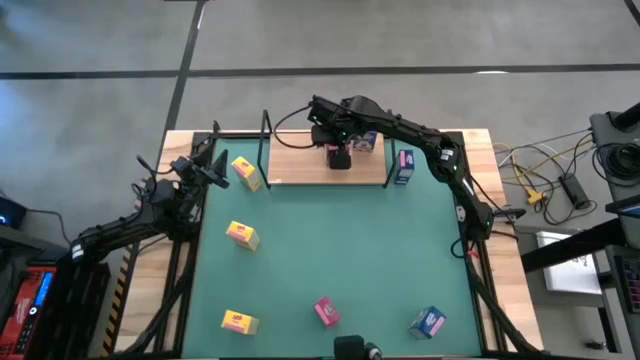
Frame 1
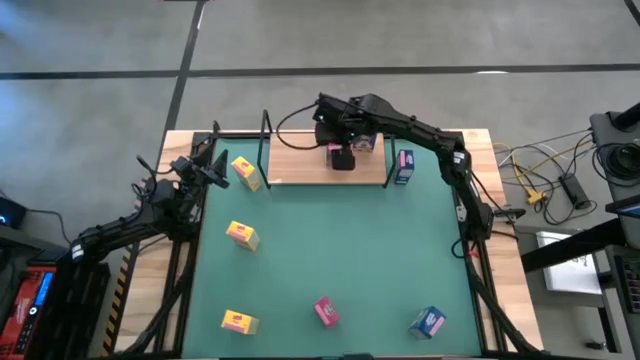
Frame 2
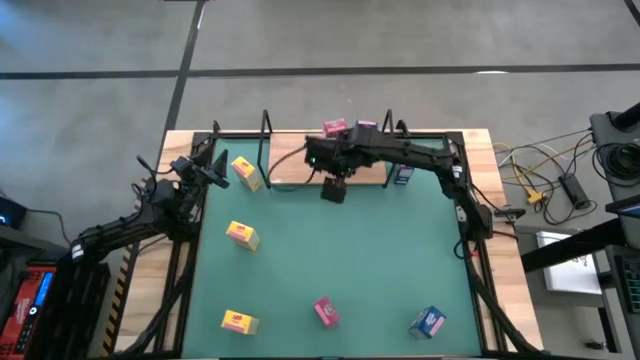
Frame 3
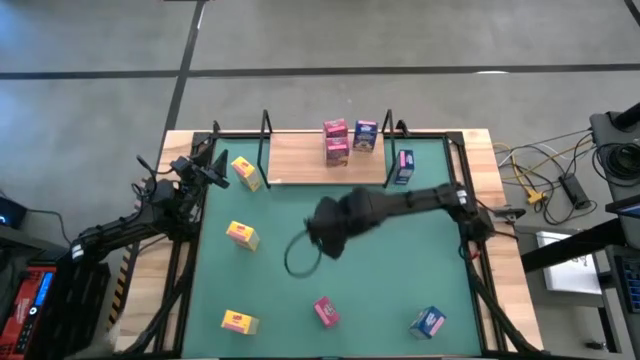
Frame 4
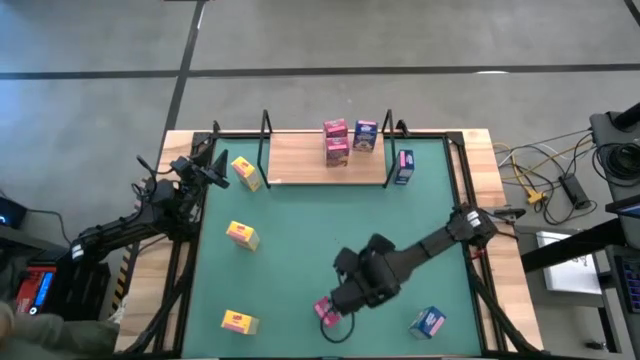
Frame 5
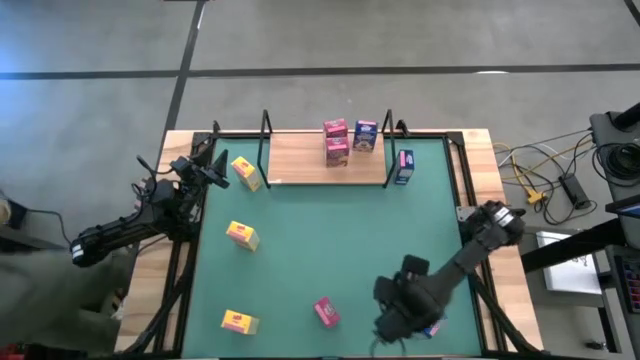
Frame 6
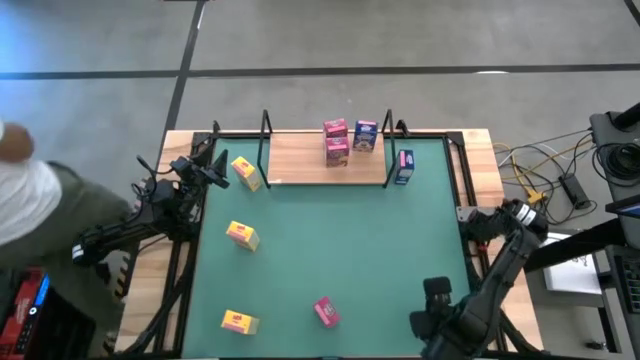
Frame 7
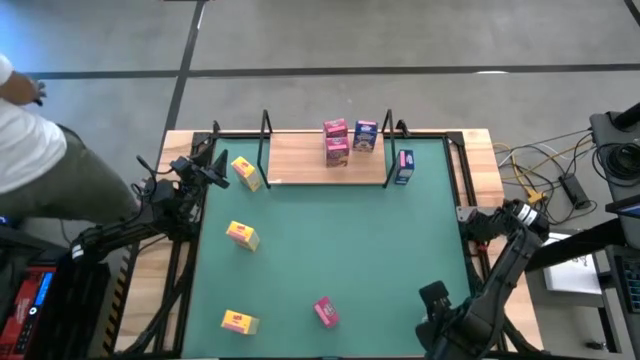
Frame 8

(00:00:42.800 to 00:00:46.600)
Task: Stack cereal on shelf
Put the bottom blue cereal box on the shelf and align with the other blue cereal box

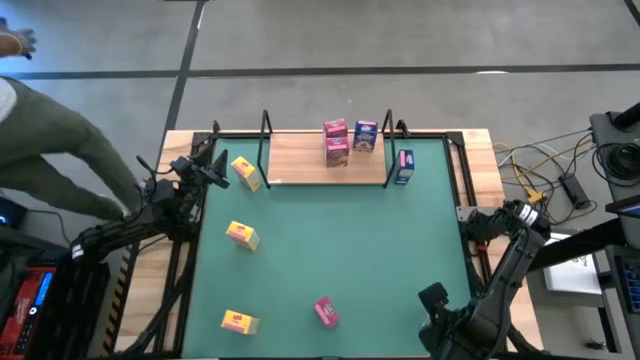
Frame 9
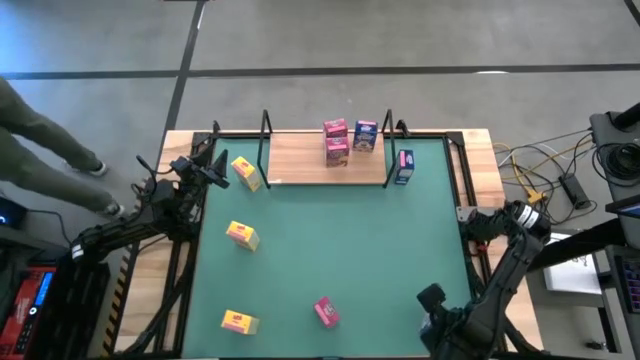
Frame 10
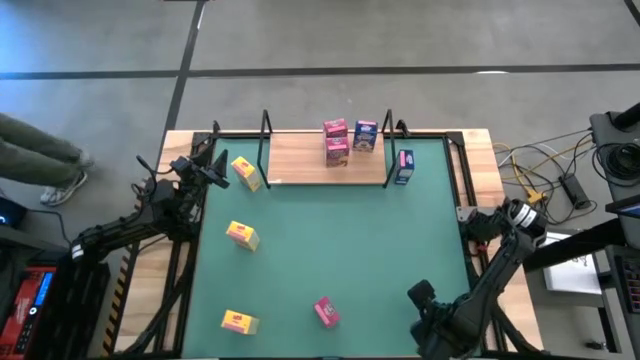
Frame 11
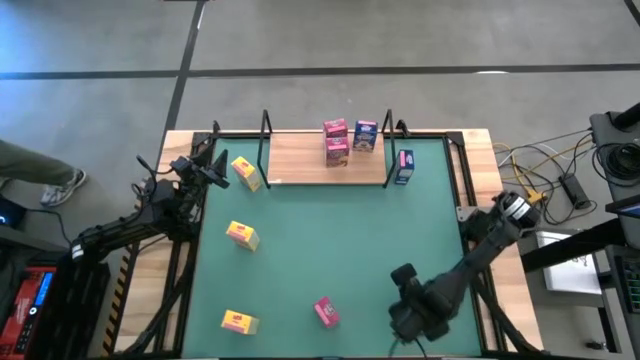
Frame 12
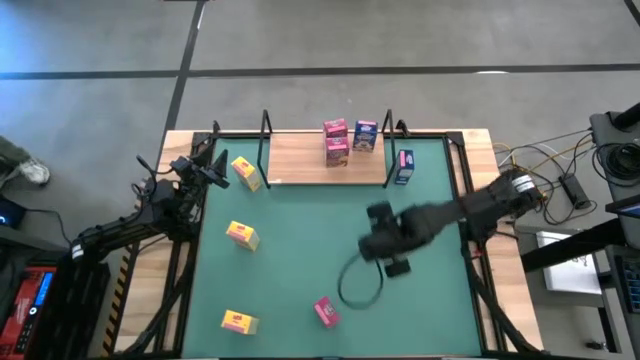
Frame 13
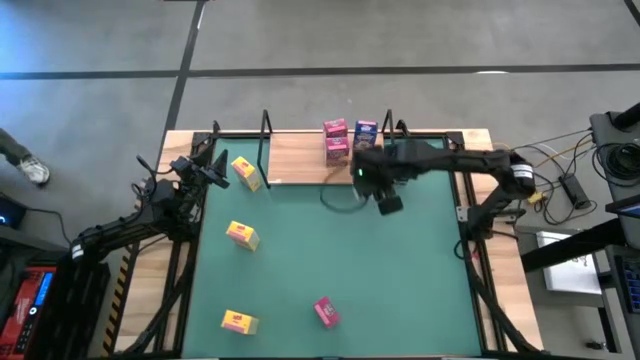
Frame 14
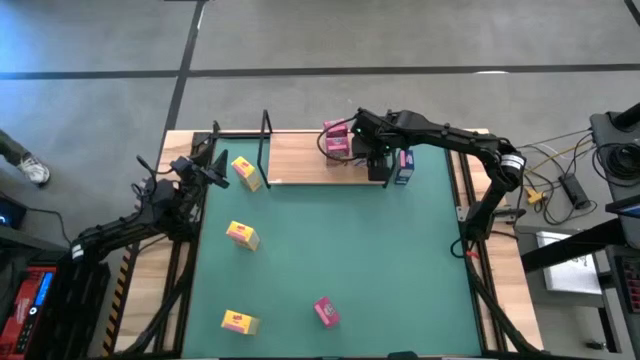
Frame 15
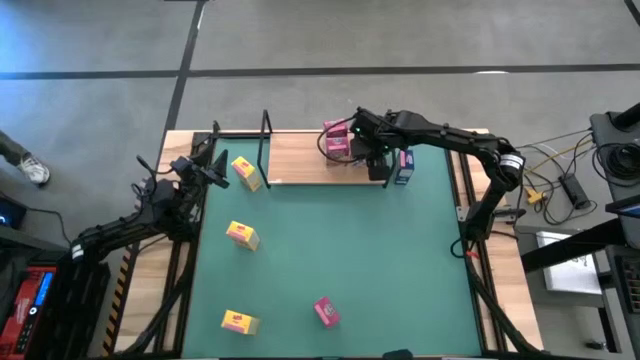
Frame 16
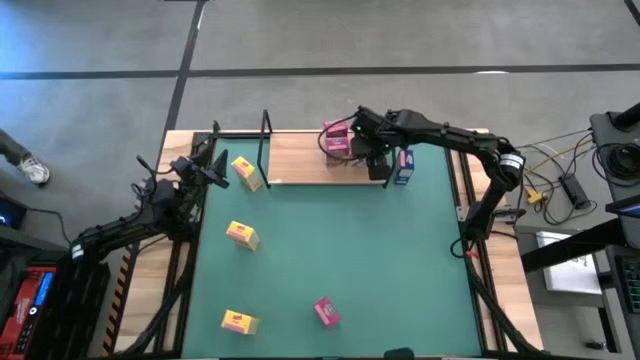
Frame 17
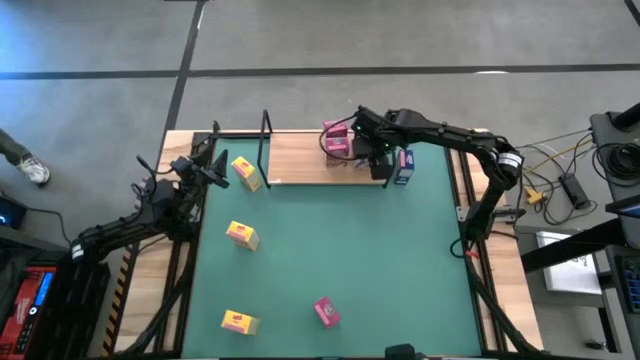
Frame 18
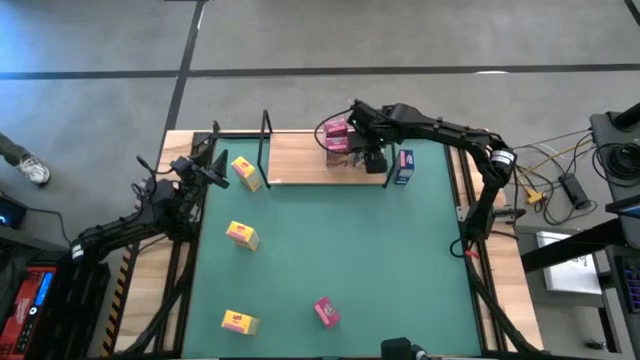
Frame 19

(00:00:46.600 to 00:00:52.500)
Put the bottom blue cereal box on the shelf and align with the other blue cereal box

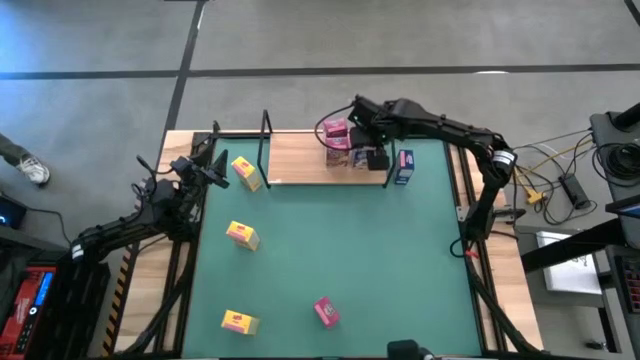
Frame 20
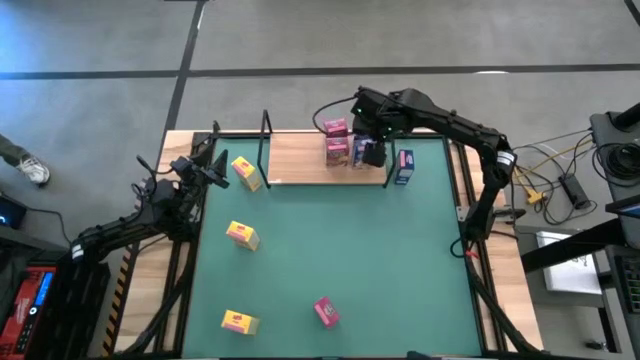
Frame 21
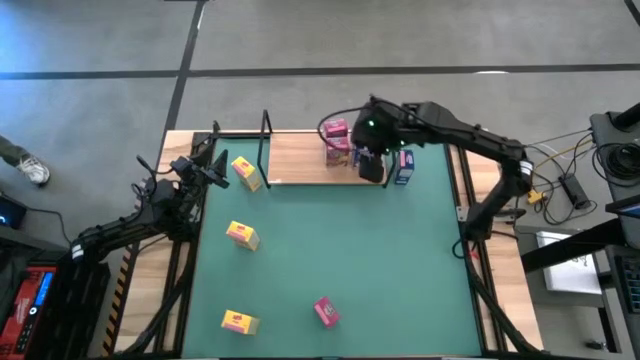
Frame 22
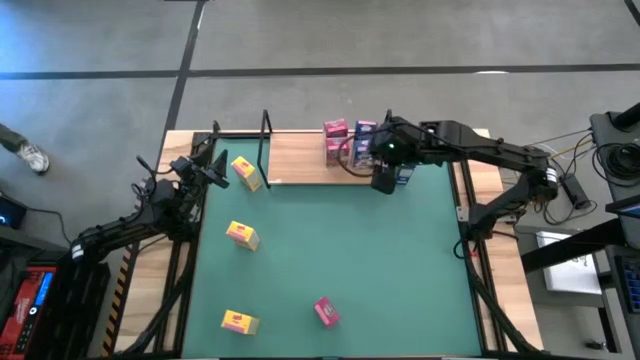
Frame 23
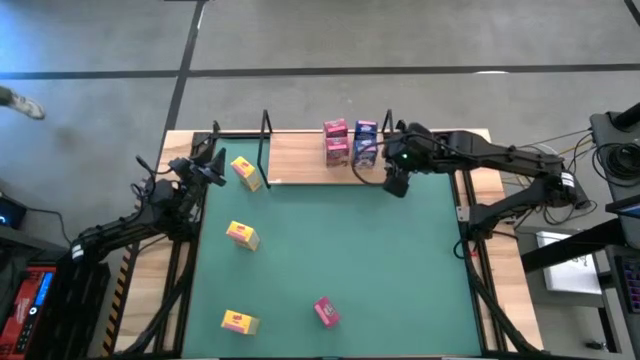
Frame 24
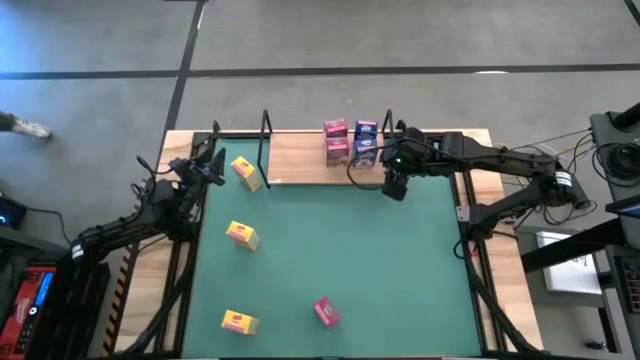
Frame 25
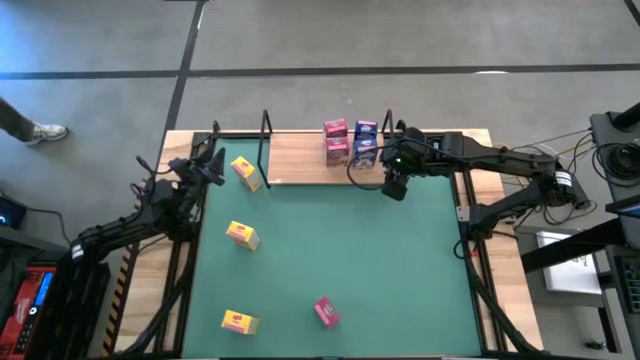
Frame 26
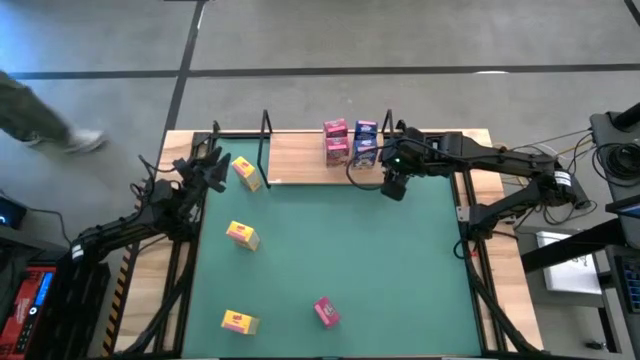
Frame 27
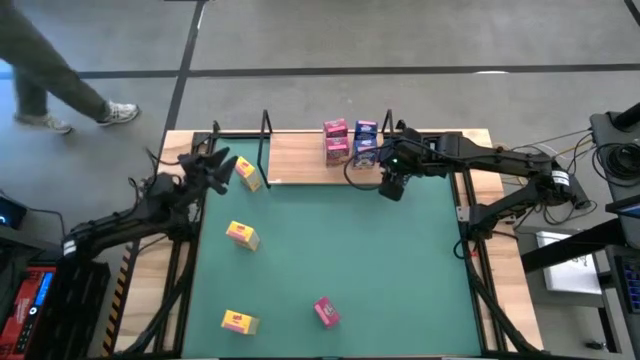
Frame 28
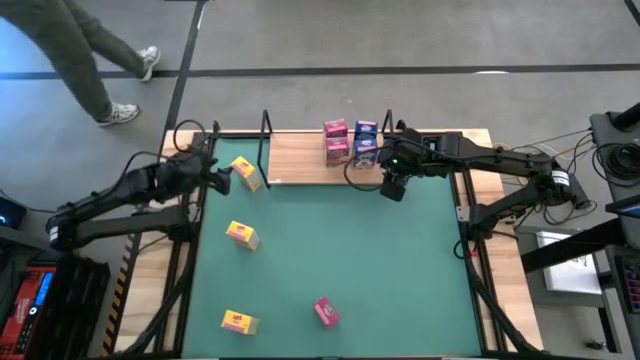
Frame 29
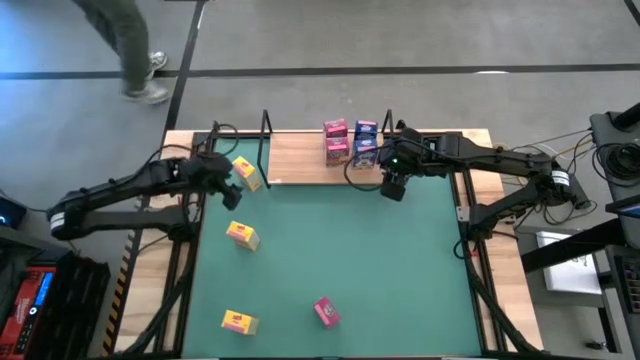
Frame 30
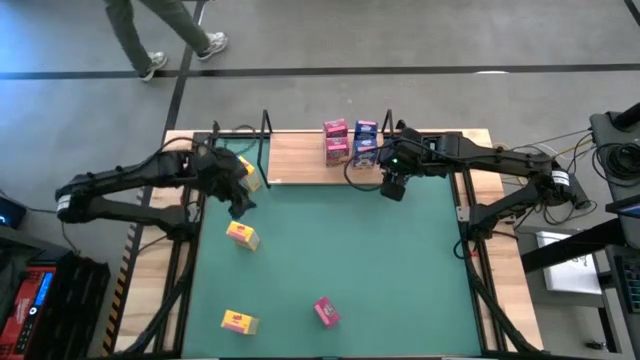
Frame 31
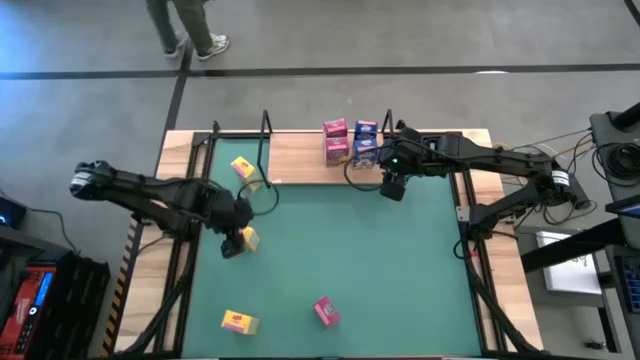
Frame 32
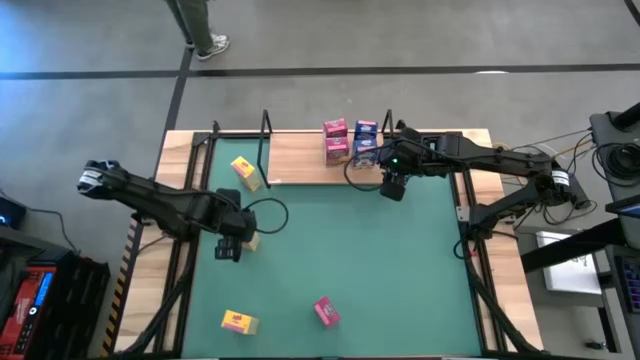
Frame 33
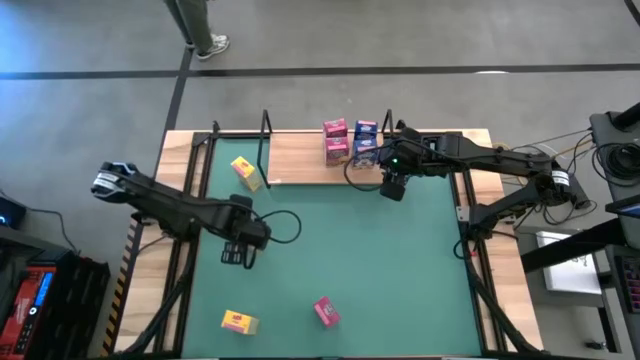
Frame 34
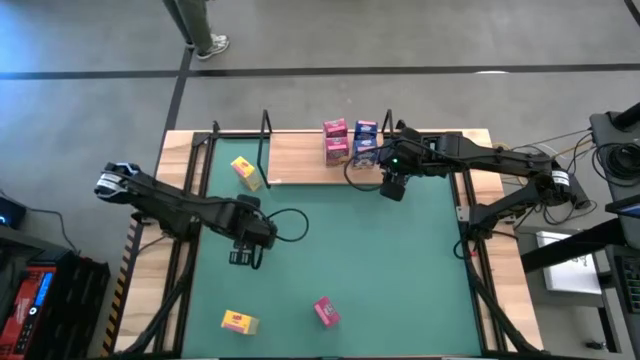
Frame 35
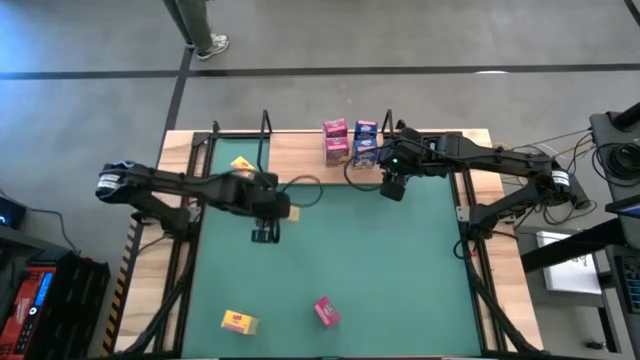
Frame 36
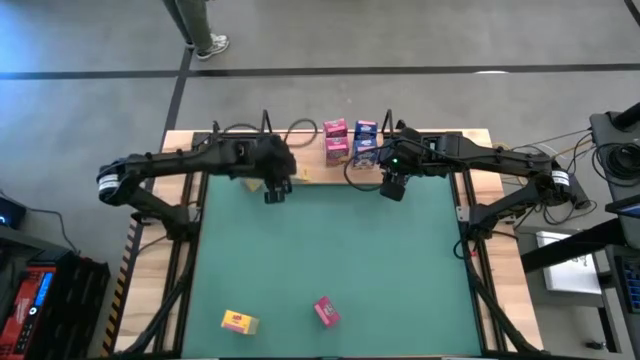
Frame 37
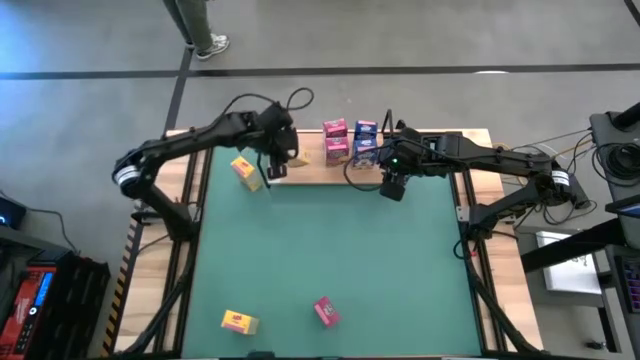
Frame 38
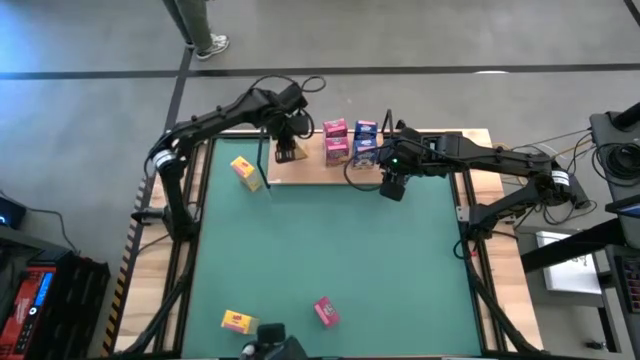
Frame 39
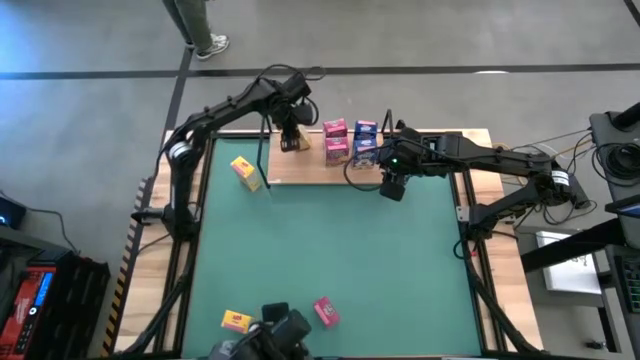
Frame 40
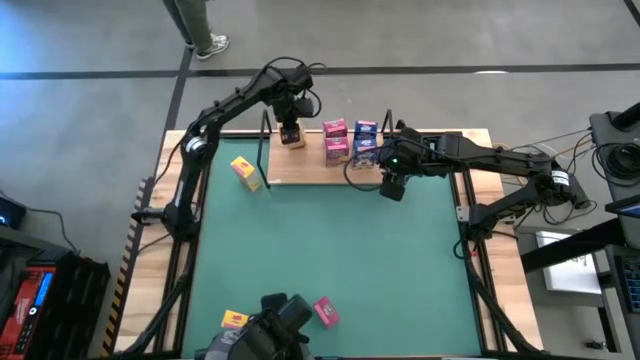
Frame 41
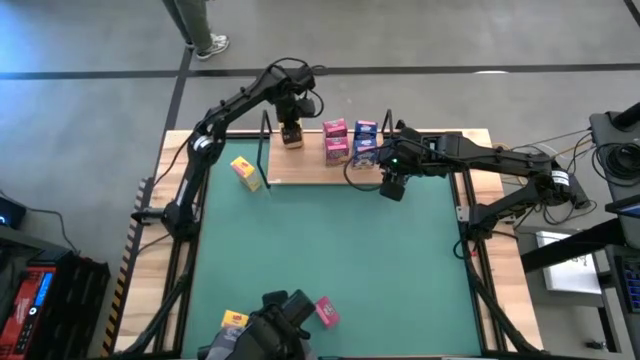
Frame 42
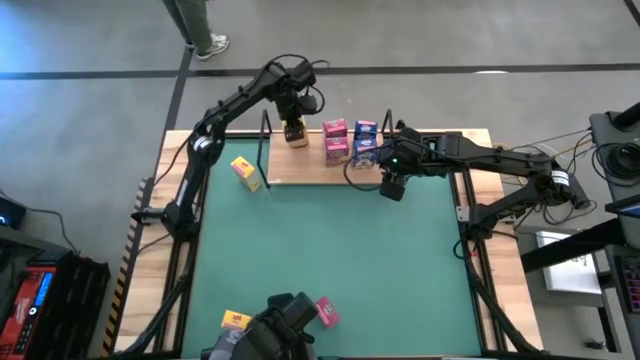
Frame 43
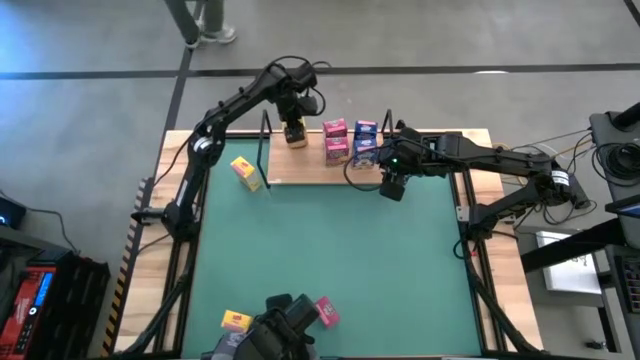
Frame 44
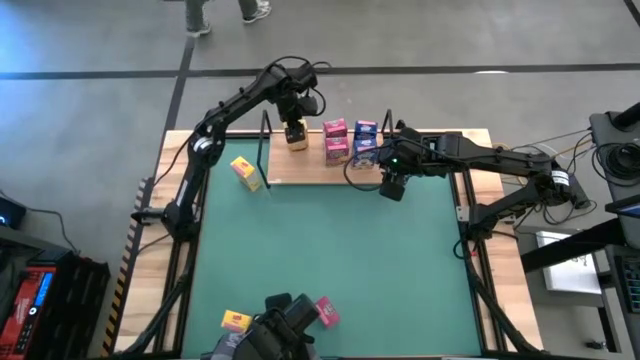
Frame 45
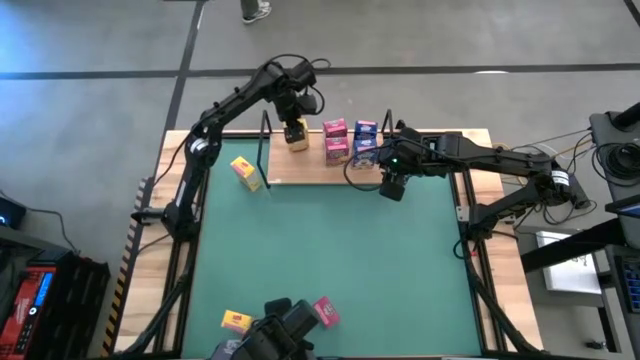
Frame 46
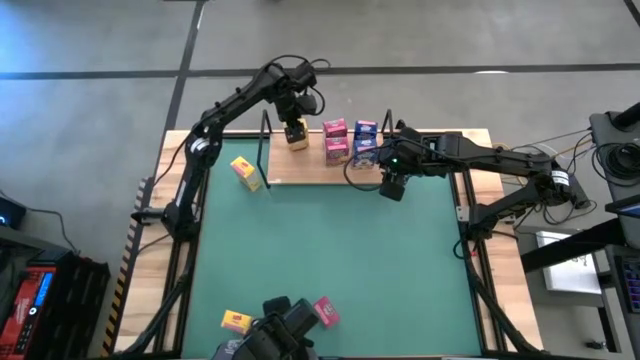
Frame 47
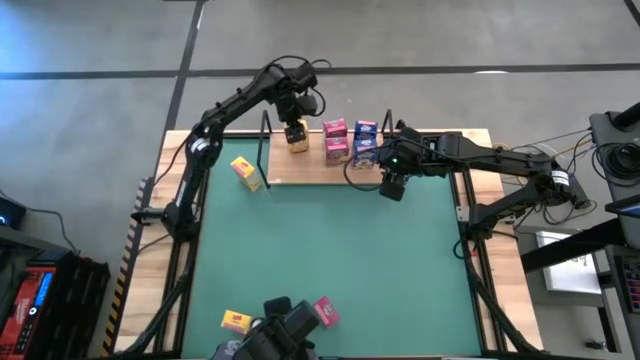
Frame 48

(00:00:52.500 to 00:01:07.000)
Put the middle yellow cereal box on the shelf
